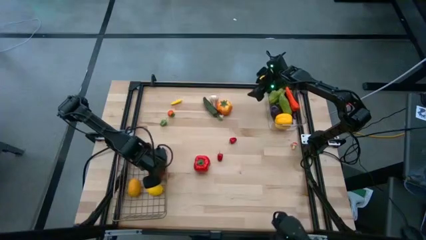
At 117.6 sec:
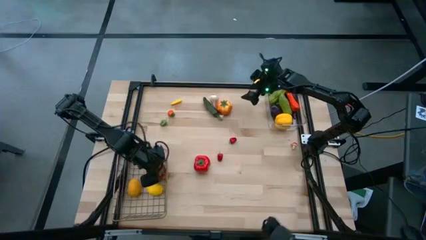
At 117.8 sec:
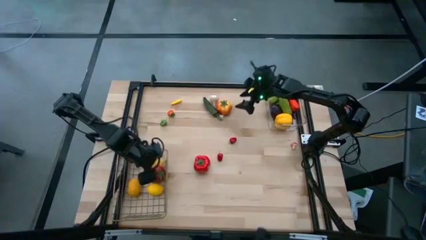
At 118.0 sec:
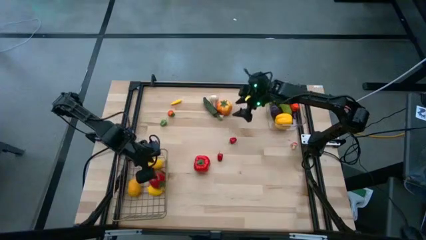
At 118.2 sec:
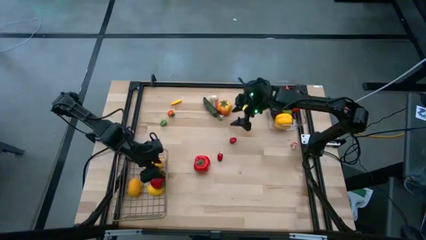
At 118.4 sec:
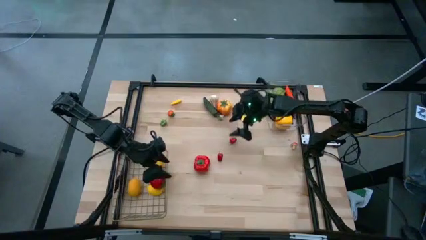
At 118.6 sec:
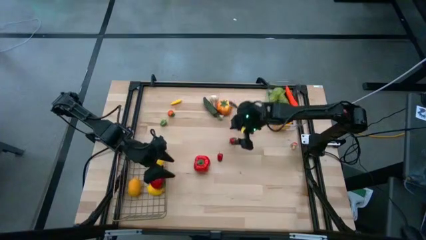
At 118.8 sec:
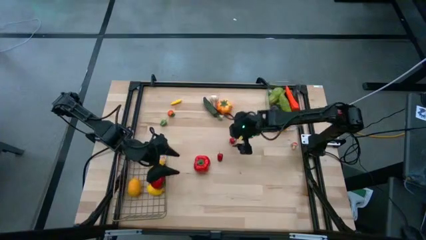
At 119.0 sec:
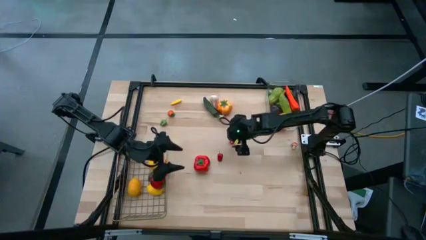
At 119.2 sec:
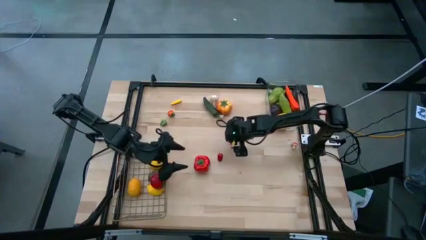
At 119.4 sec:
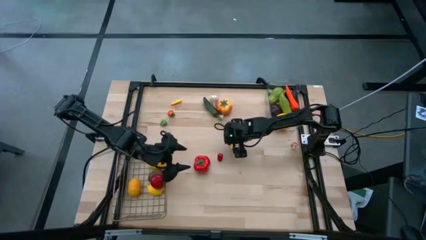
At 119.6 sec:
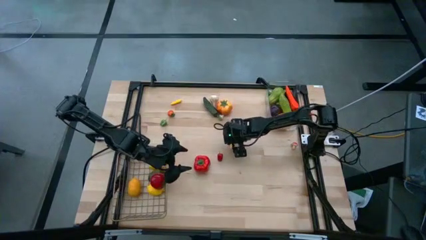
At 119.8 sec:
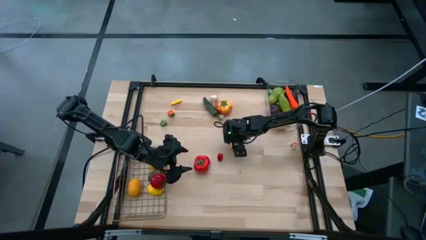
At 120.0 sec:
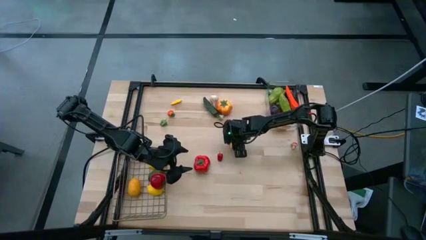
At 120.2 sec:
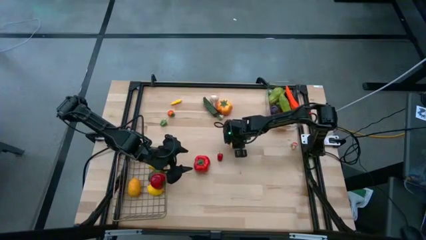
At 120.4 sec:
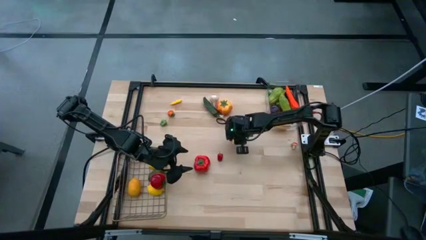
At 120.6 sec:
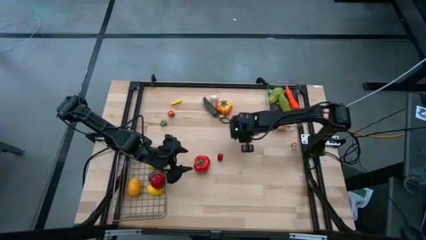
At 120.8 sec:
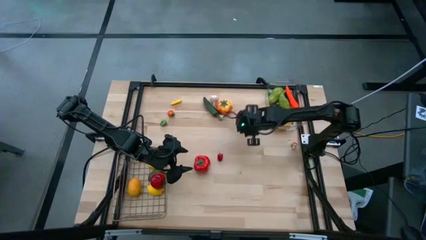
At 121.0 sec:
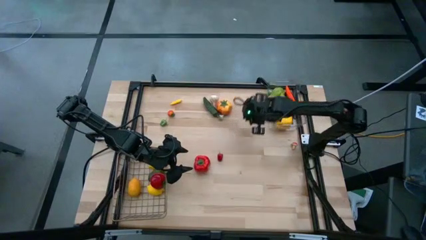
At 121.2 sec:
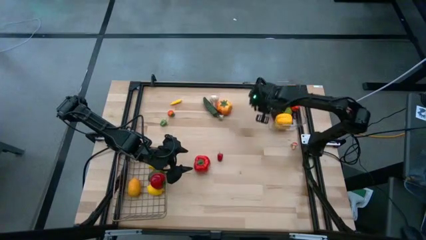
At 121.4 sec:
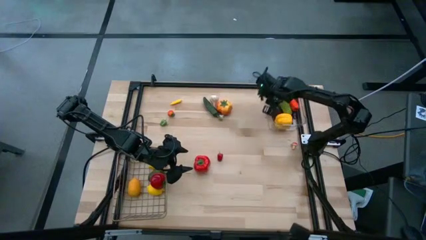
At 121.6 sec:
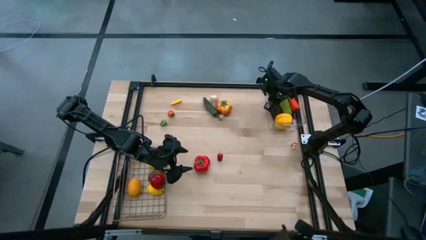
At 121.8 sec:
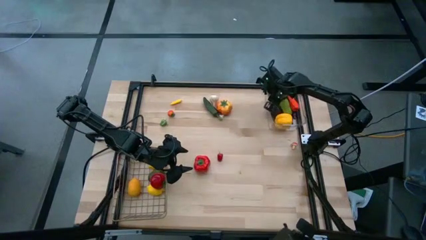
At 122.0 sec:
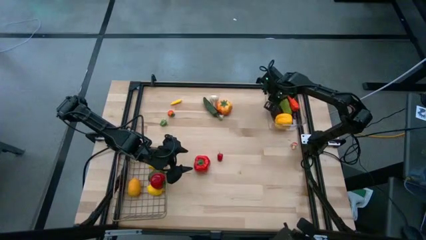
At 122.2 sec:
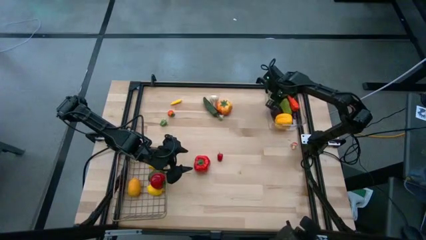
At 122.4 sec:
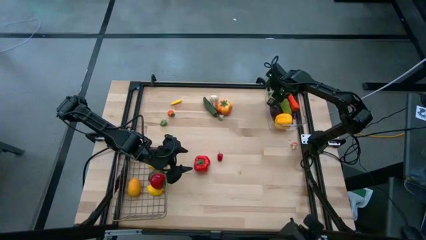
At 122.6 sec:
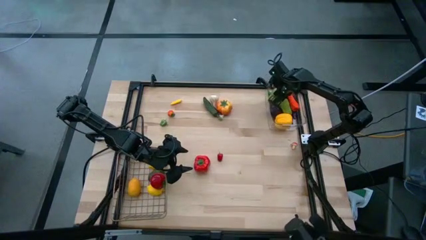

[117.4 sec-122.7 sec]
Task: Sort produce into baskets
Put the top red chili pepper into the transparent bin

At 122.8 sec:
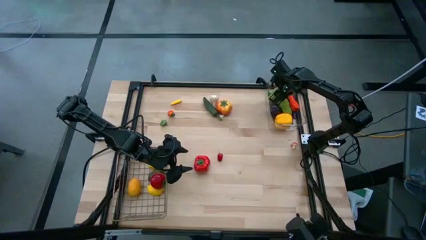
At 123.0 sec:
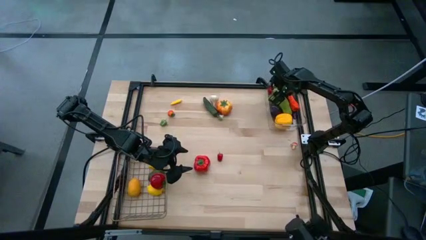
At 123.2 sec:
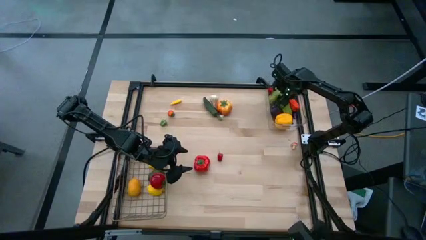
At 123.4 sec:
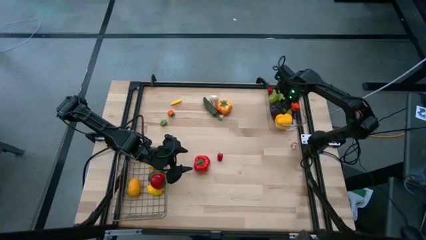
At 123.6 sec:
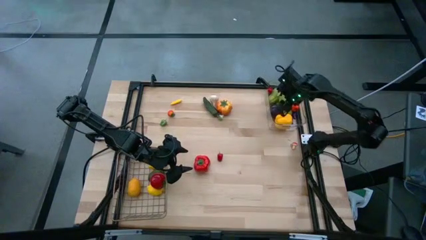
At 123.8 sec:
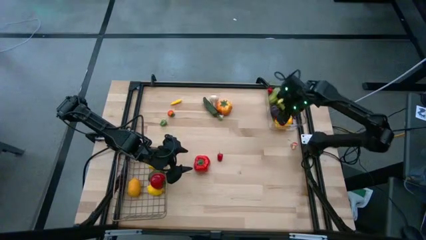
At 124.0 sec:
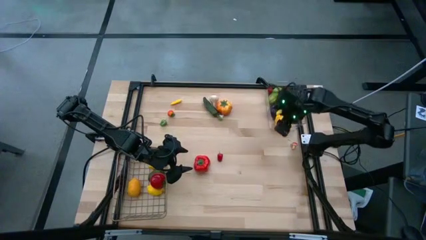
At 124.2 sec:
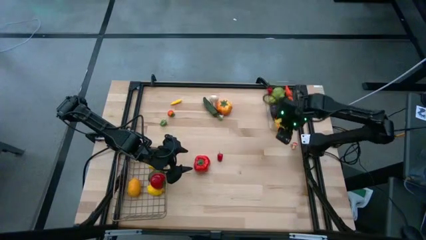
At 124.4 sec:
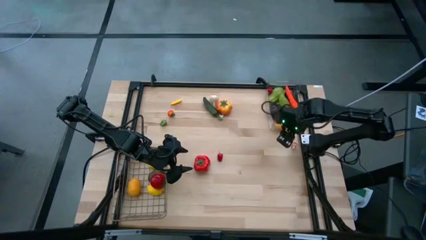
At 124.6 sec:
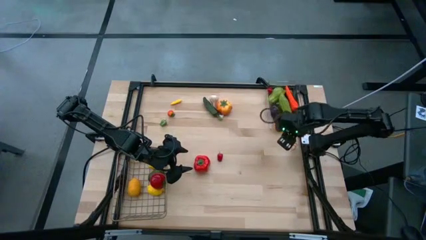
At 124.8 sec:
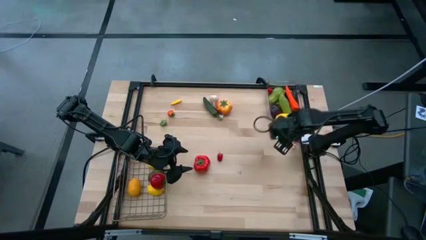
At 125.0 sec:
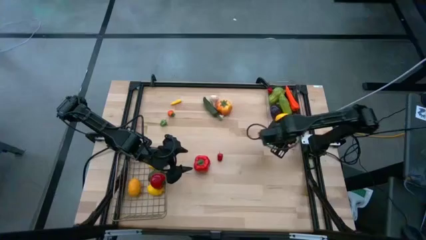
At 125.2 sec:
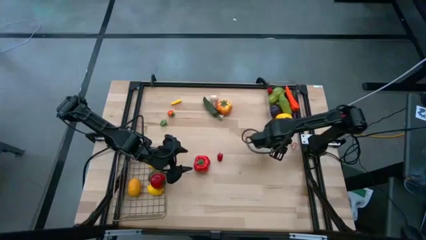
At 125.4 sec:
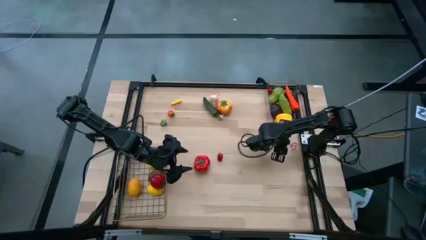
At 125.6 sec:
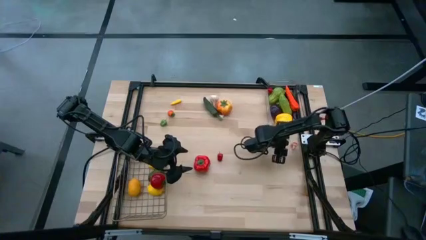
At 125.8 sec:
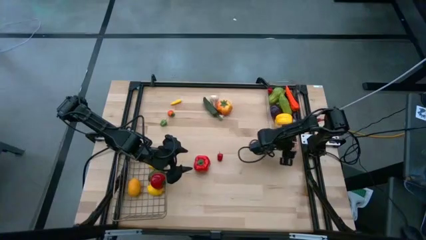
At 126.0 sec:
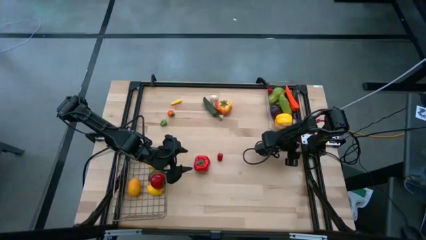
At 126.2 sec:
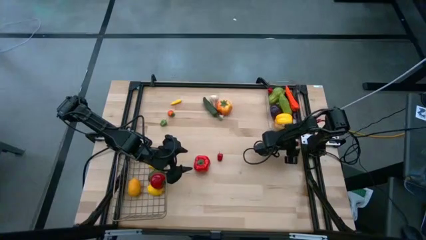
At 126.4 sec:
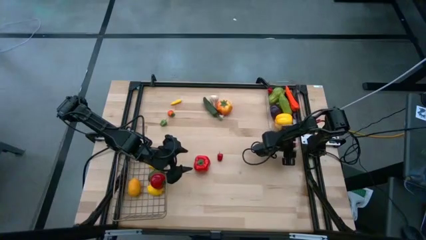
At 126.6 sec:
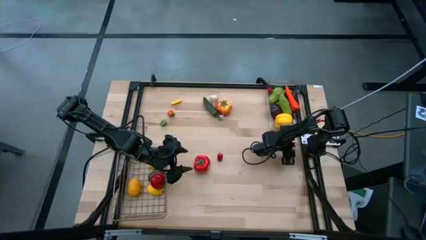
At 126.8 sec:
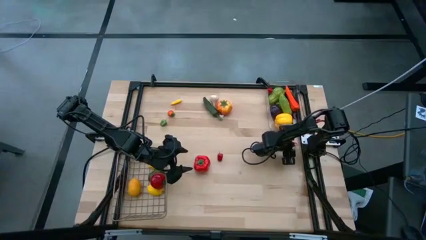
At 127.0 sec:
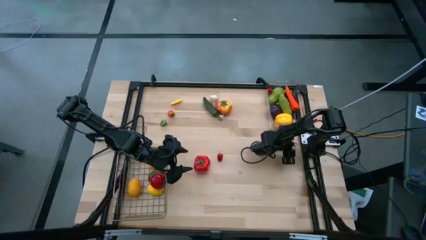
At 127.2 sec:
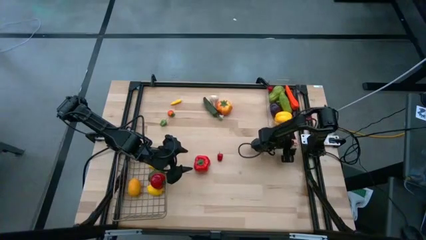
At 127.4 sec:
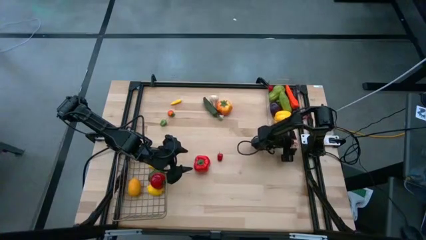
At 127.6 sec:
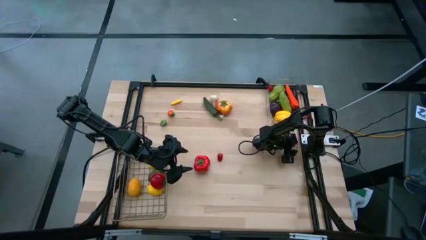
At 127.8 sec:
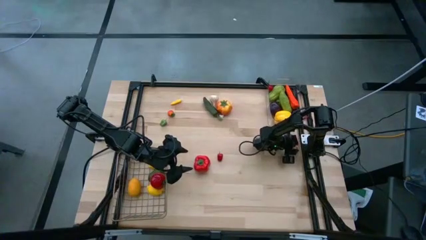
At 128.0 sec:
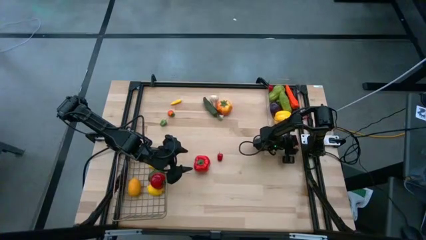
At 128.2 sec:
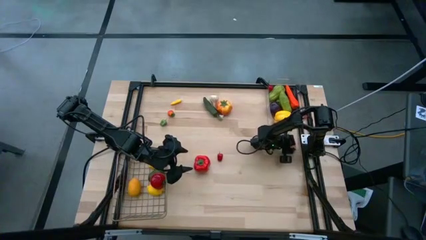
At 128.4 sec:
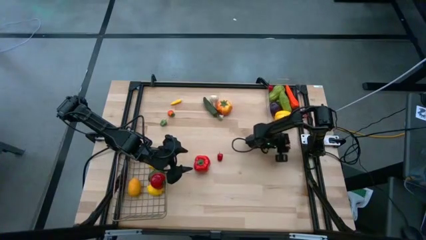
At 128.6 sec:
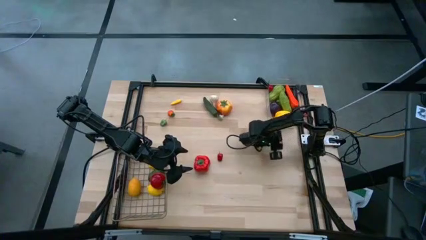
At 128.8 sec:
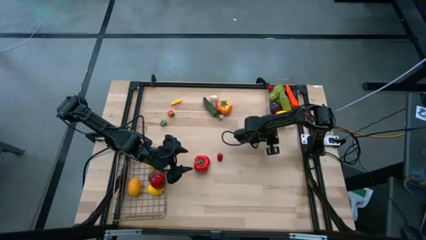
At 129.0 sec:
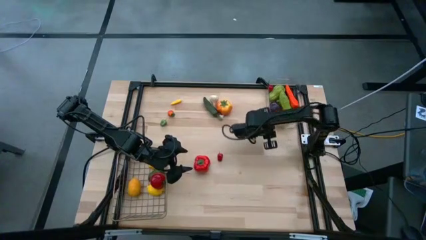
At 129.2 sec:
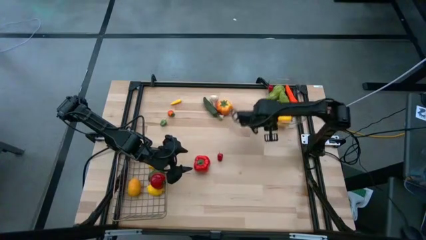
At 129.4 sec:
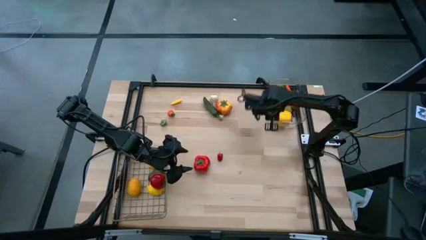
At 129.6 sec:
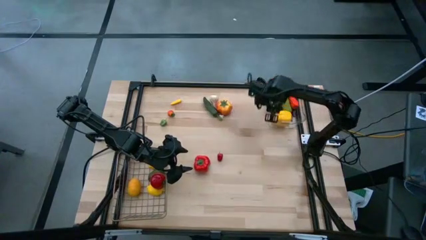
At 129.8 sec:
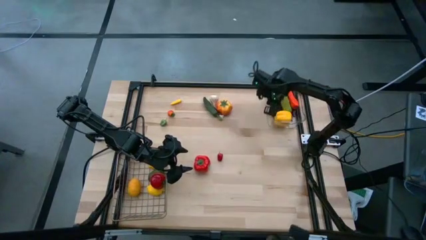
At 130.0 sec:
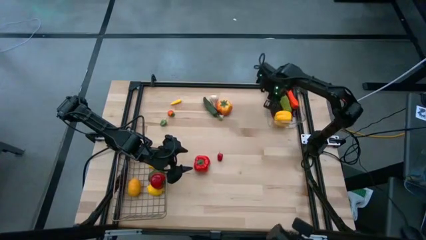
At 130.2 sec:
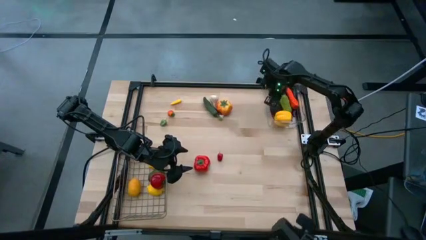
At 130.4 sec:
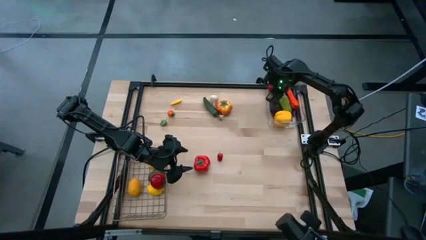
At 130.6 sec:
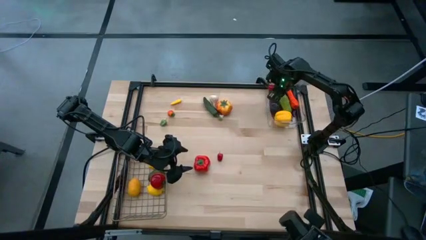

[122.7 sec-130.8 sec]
Put the red mushroom into the transparent bin
